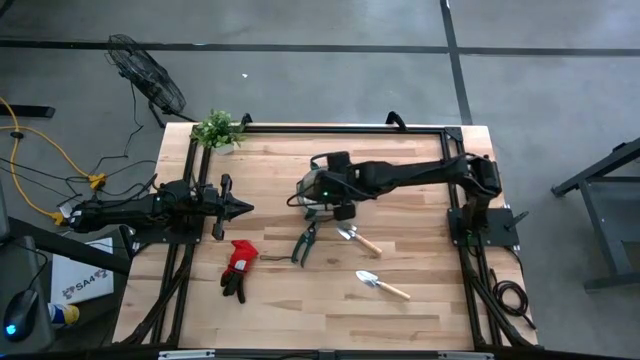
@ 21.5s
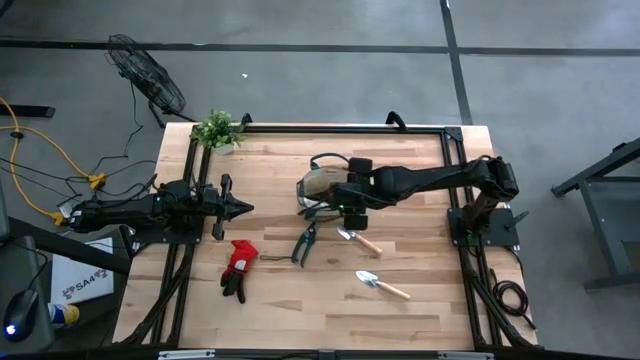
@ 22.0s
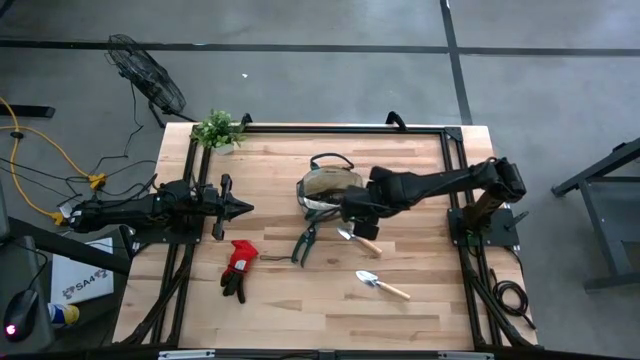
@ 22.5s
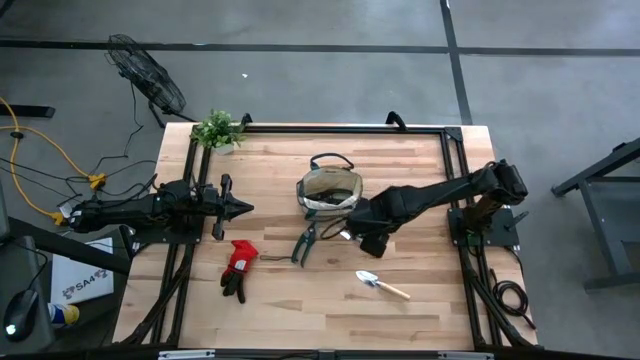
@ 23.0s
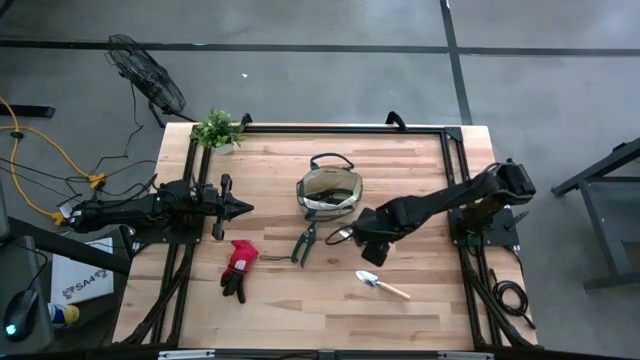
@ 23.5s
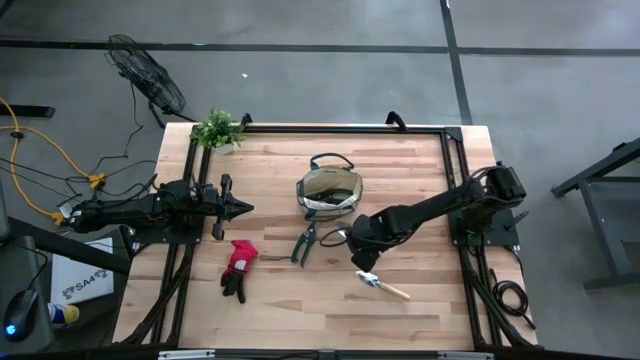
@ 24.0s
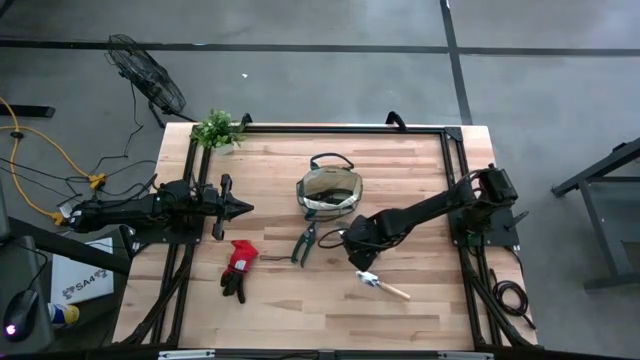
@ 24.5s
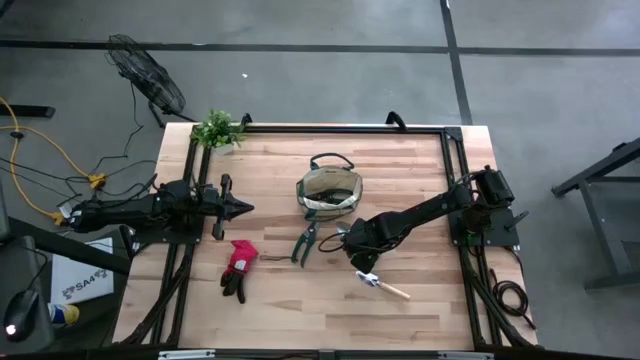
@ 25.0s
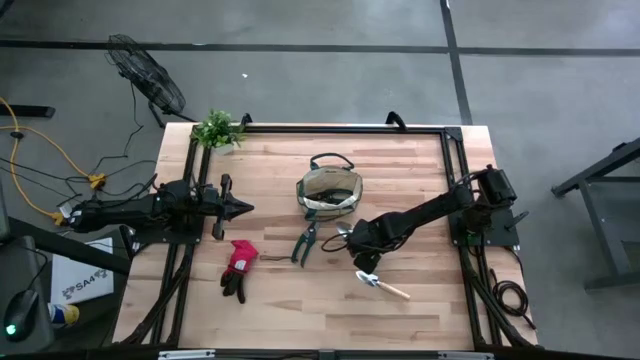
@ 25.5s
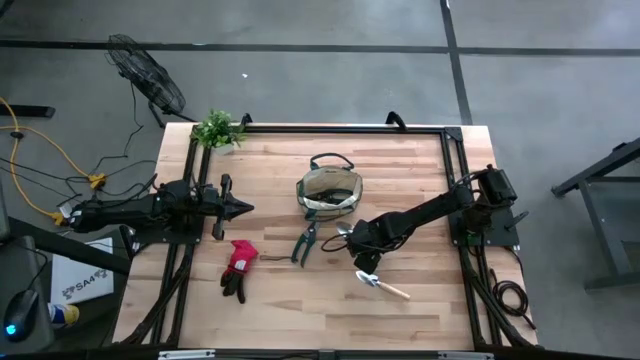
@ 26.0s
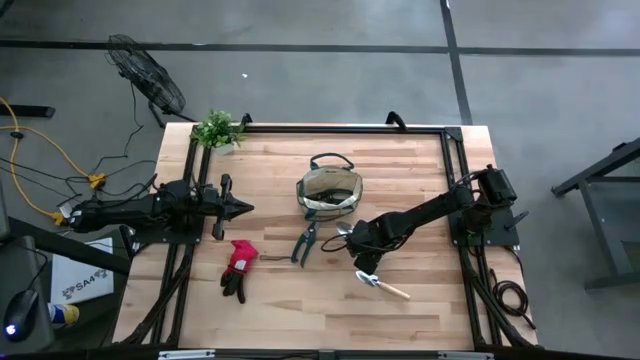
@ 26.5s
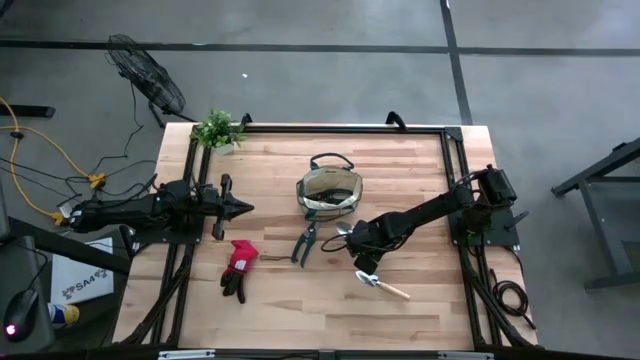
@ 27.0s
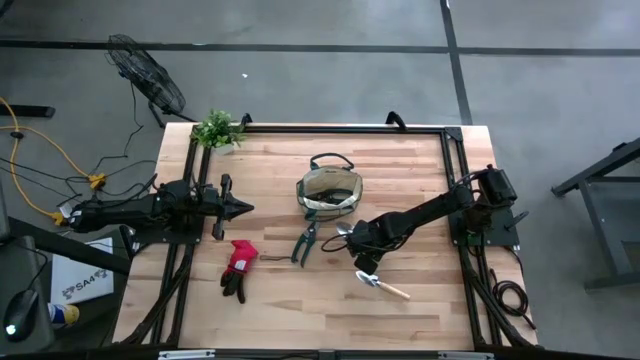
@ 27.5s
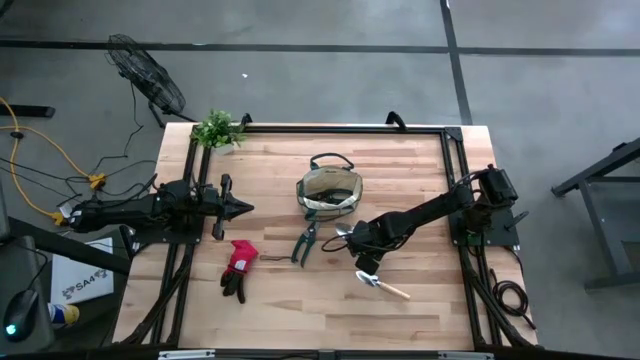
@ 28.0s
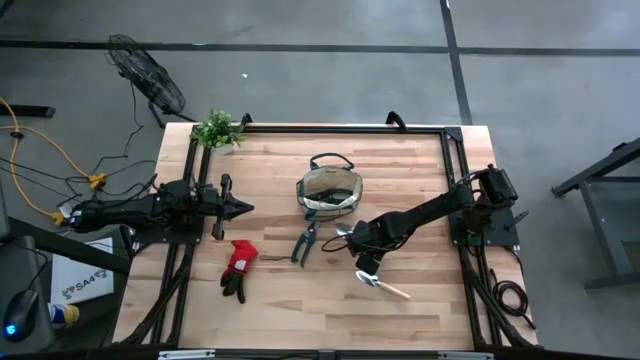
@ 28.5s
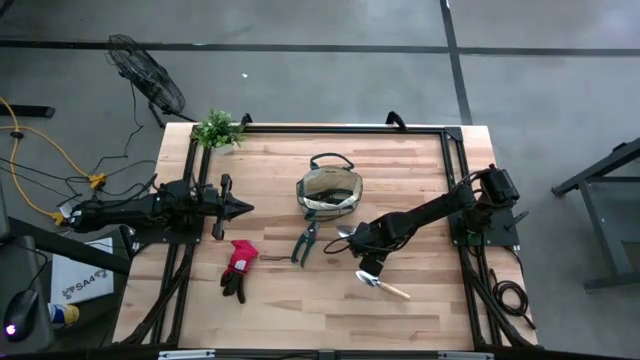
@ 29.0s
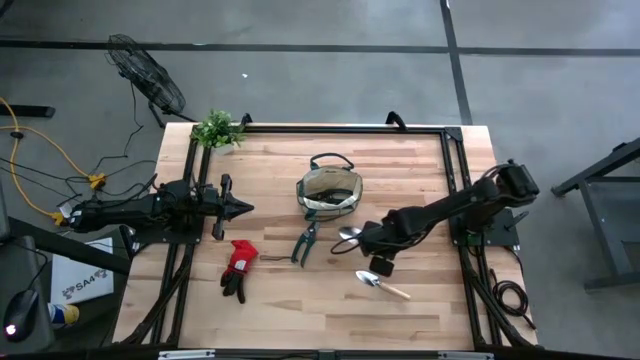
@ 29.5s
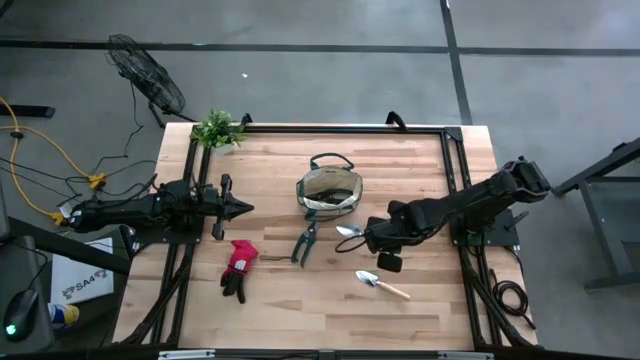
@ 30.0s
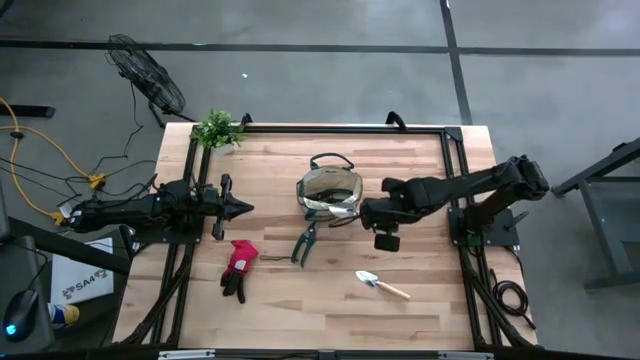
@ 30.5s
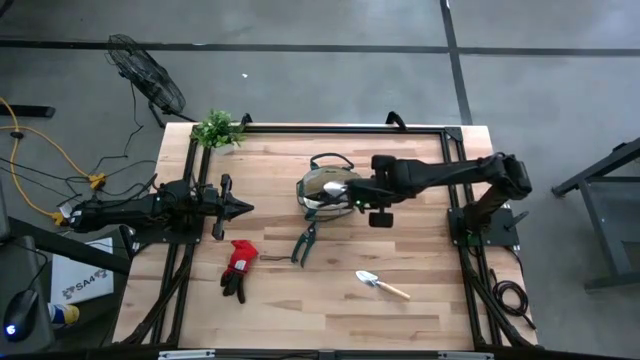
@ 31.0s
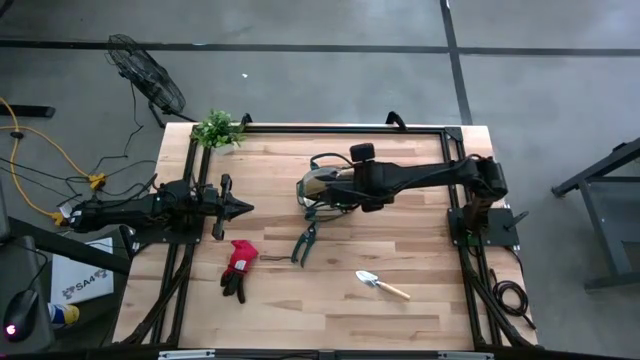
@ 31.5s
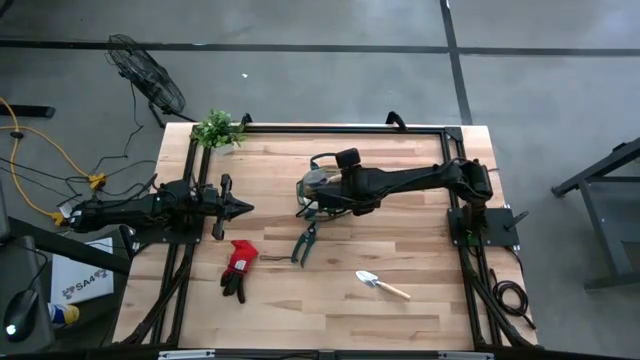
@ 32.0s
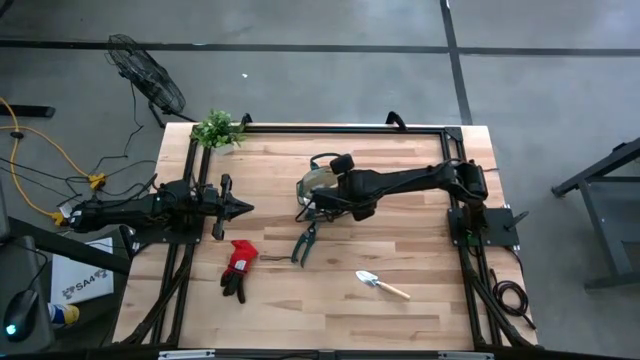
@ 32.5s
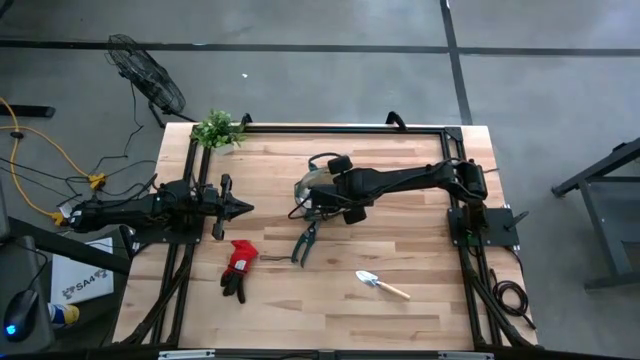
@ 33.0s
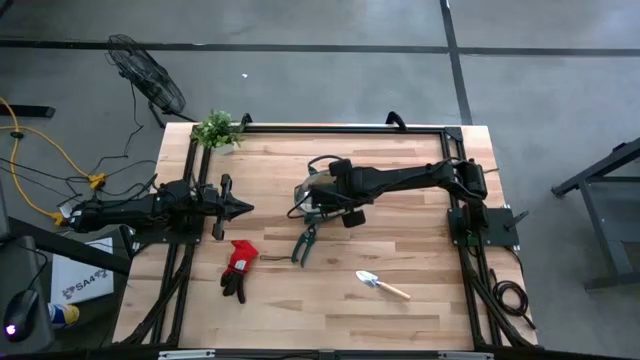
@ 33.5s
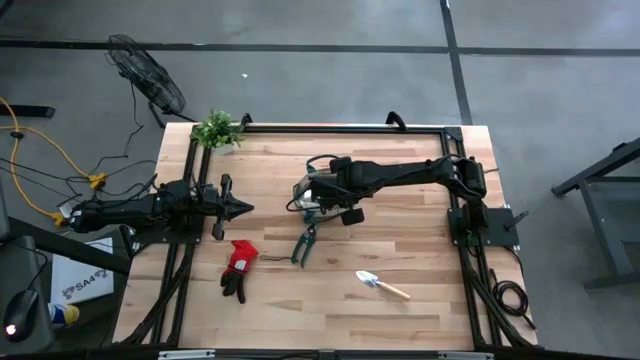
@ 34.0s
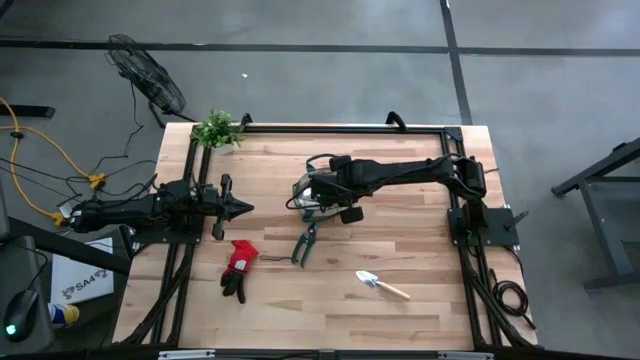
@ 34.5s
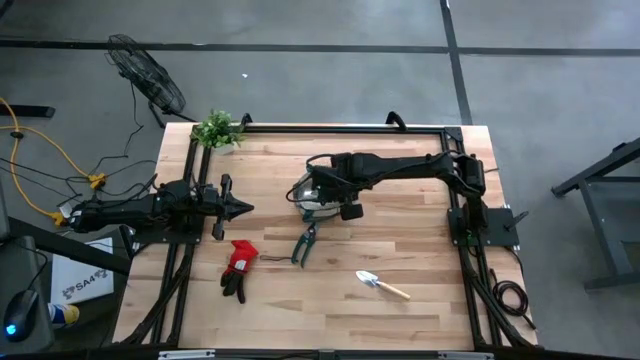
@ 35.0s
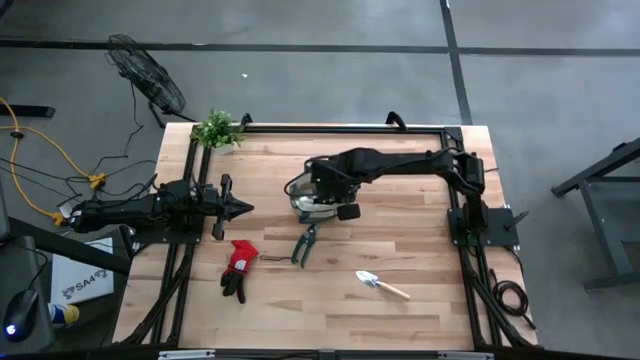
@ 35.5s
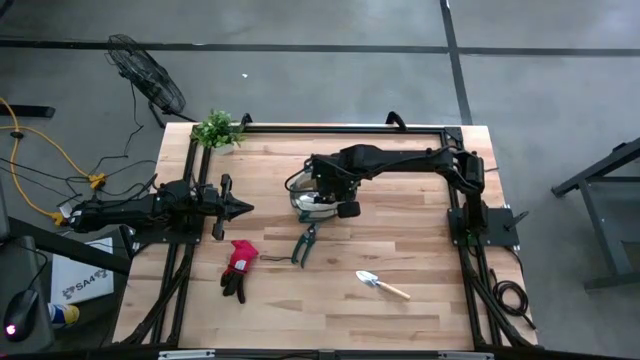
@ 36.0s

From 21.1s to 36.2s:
Task: Pick & Place Garden tools in Gardening bag
Put the top brown trowel into the gardening bag
